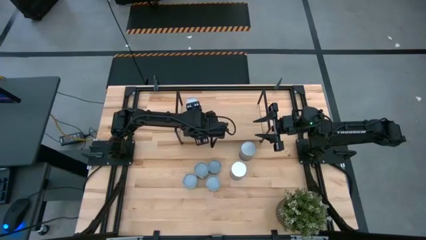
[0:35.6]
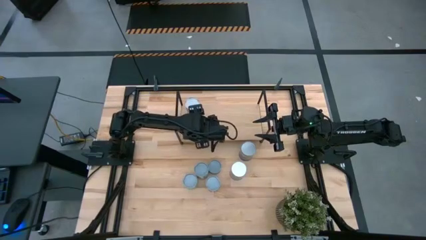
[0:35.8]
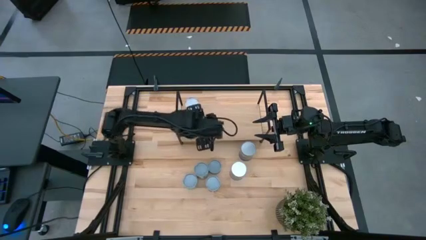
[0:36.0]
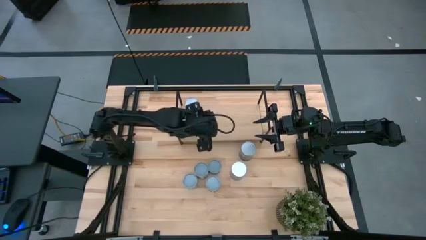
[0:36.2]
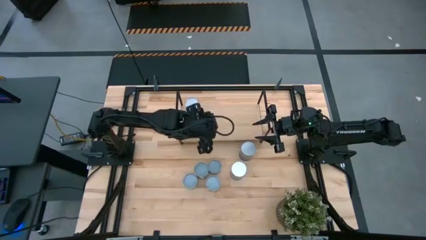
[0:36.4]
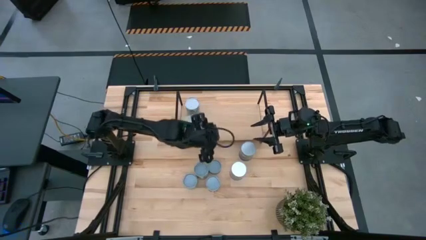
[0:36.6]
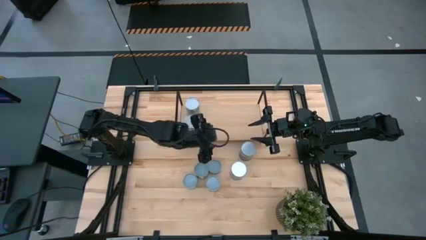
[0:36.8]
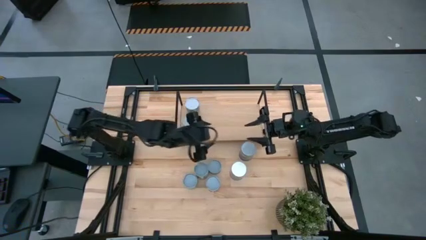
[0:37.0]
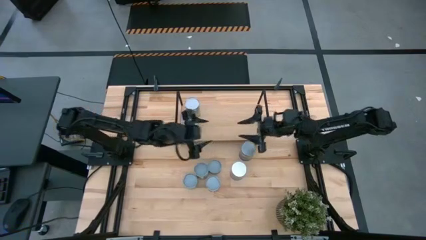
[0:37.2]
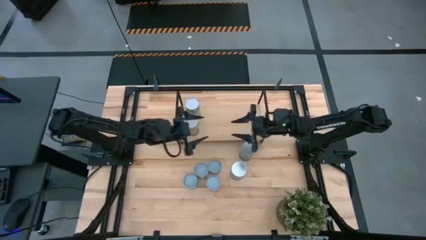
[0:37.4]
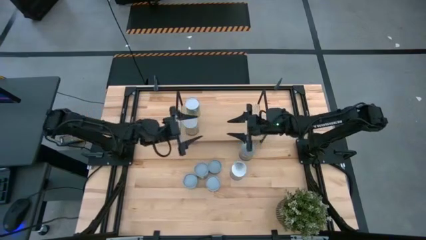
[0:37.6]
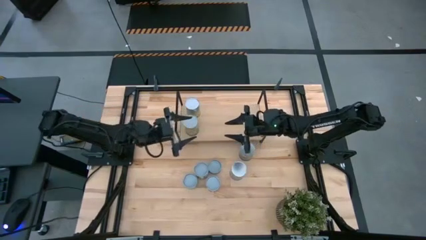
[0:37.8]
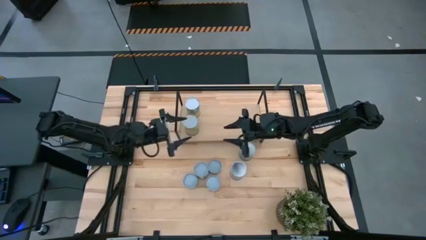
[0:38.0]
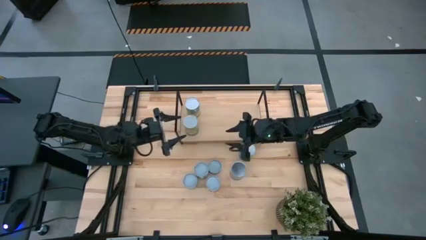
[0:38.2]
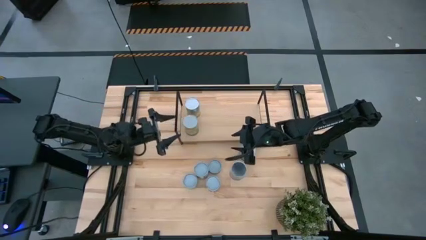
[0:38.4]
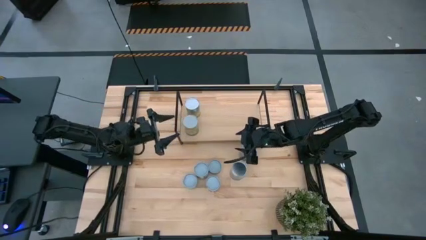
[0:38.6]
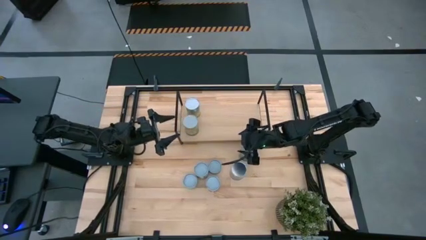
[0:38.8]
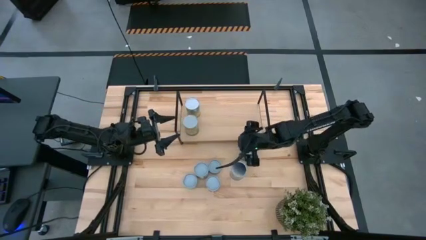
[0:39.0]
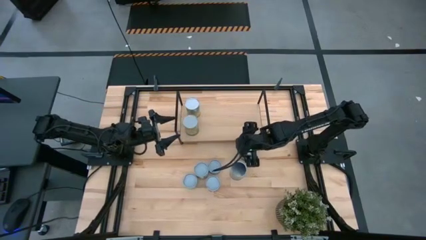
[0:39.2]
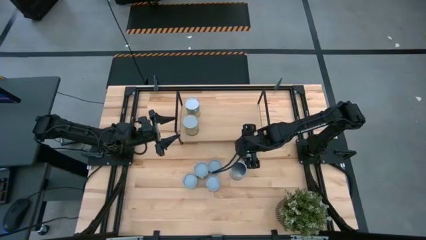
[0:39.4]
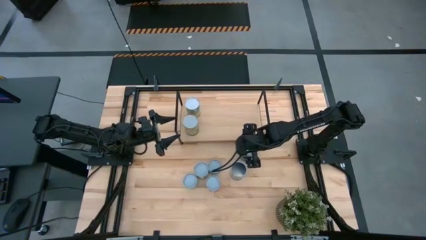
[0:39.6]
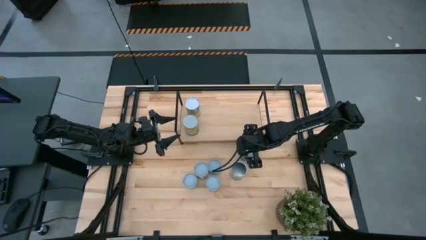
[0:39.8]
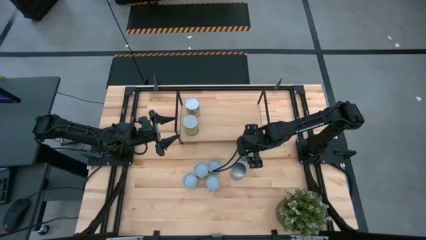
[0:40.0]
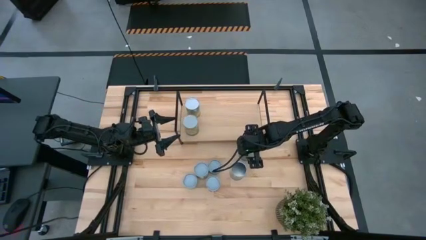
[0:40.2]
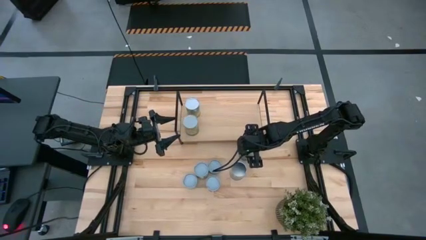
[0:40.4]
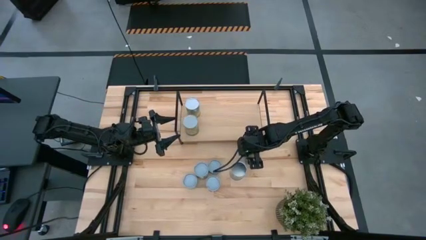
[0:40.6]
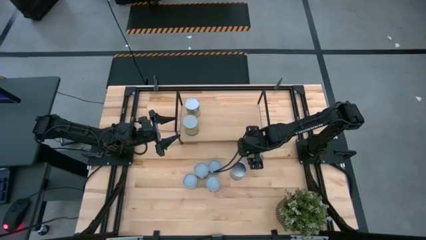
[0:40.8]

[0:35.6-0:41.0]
Task: Pick and place cans onto a shelf
Put the canned peas on the shelf

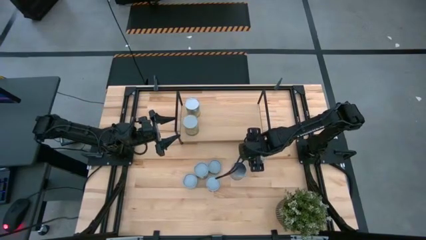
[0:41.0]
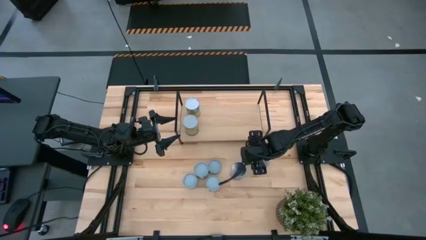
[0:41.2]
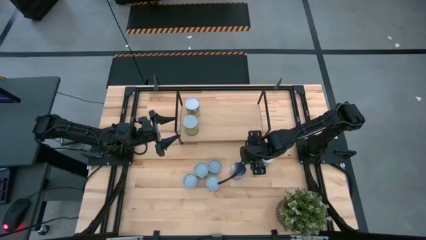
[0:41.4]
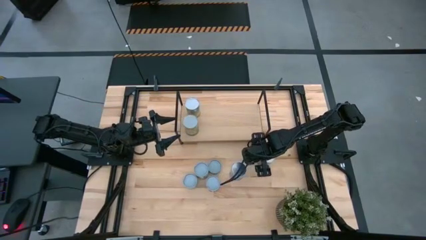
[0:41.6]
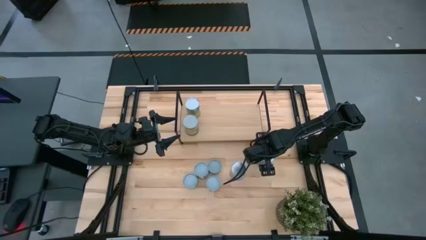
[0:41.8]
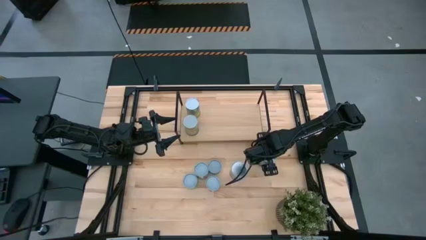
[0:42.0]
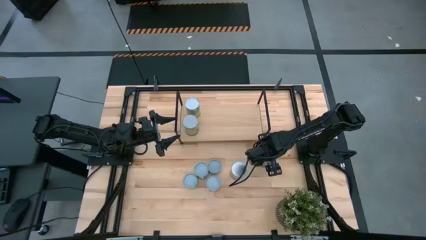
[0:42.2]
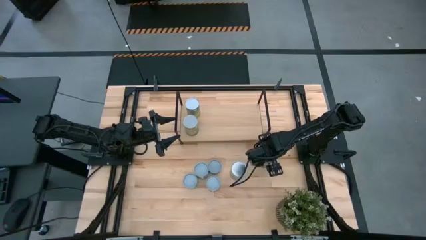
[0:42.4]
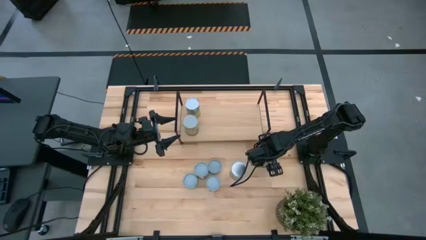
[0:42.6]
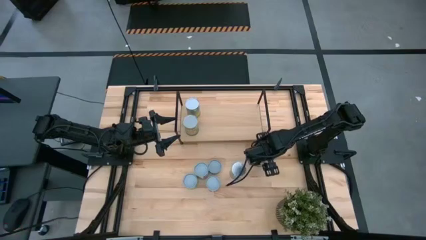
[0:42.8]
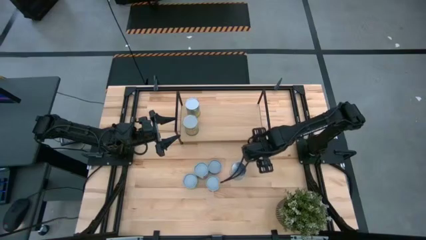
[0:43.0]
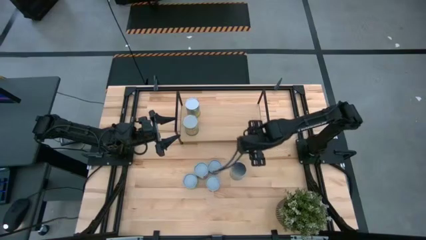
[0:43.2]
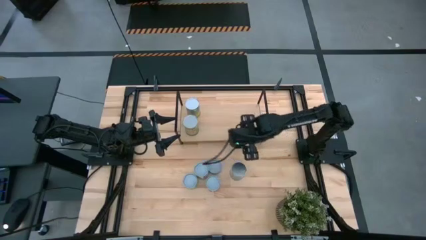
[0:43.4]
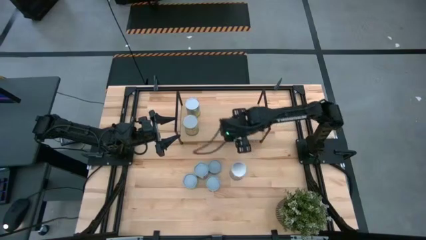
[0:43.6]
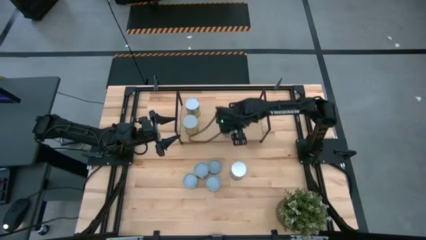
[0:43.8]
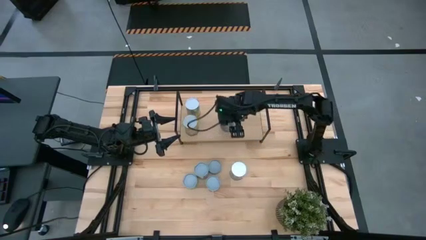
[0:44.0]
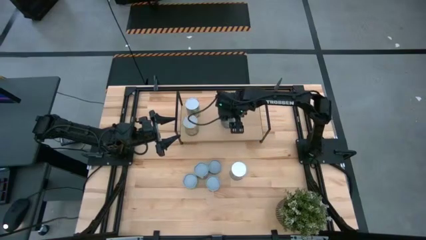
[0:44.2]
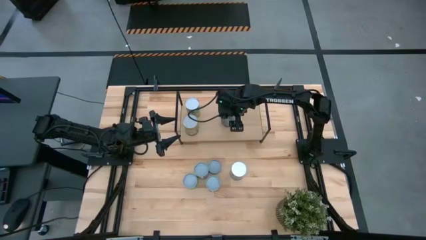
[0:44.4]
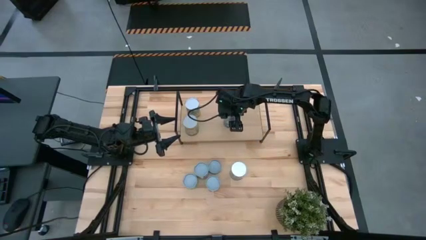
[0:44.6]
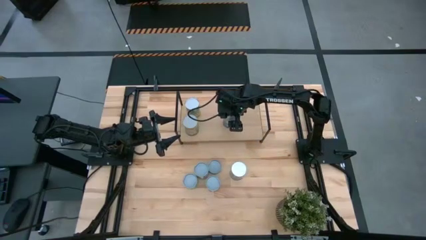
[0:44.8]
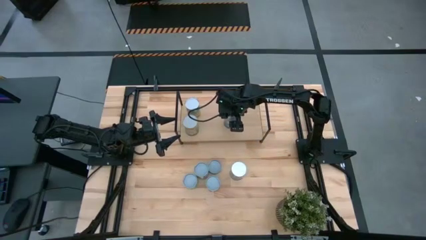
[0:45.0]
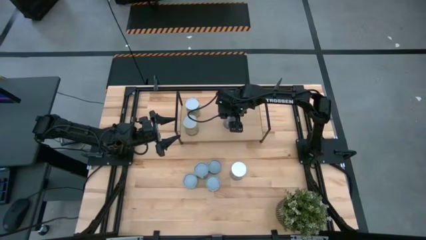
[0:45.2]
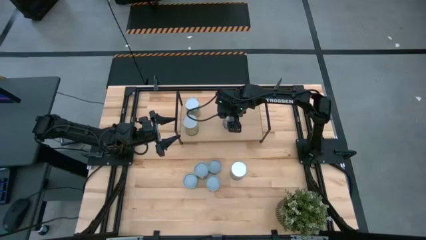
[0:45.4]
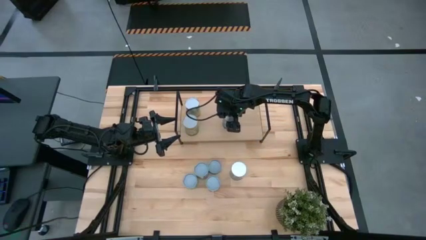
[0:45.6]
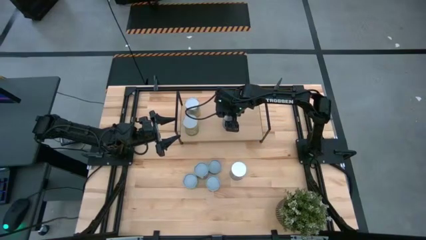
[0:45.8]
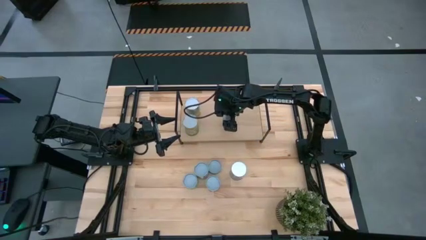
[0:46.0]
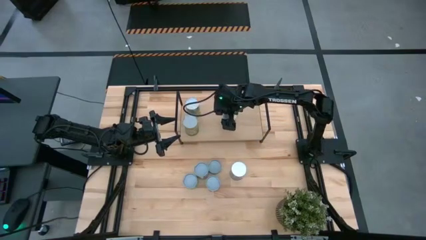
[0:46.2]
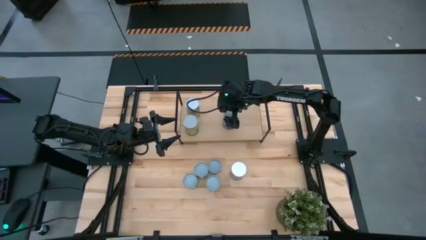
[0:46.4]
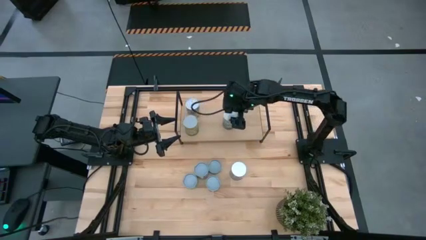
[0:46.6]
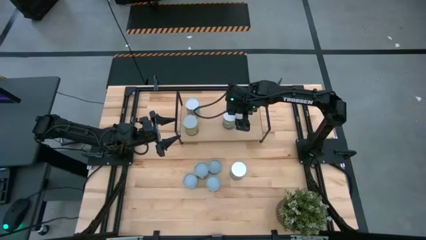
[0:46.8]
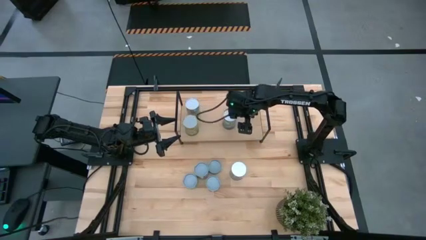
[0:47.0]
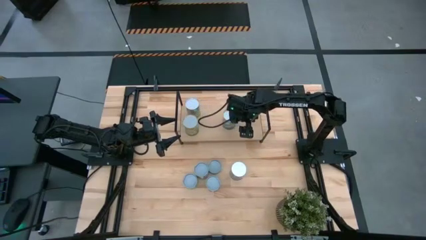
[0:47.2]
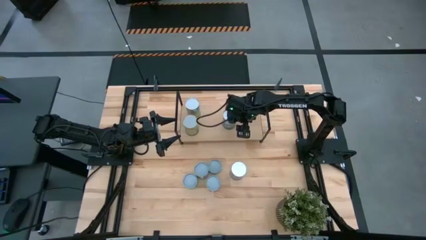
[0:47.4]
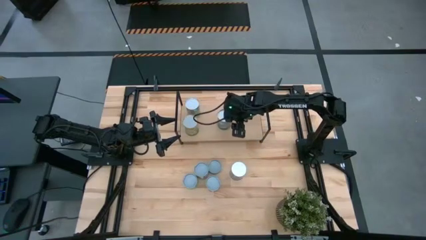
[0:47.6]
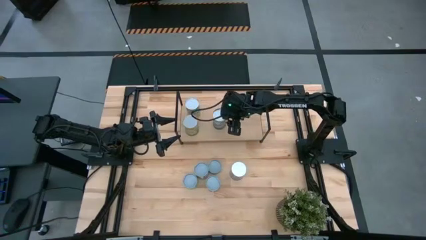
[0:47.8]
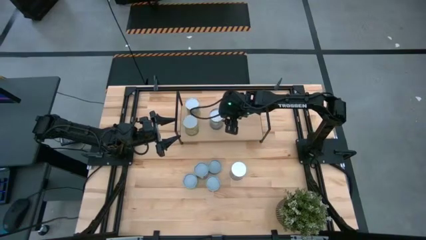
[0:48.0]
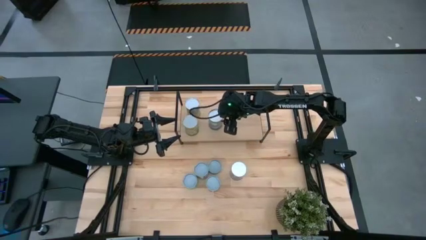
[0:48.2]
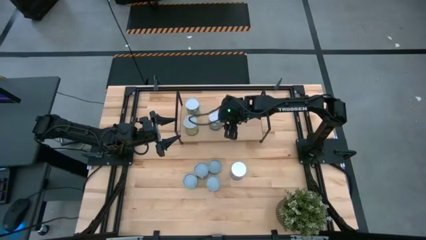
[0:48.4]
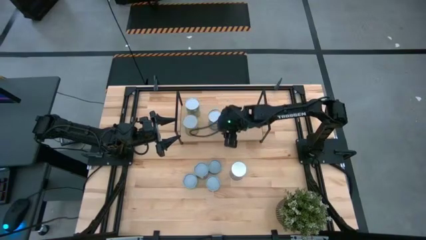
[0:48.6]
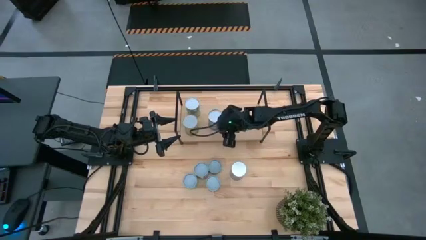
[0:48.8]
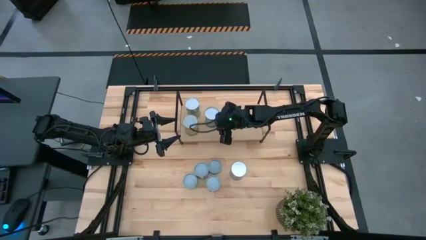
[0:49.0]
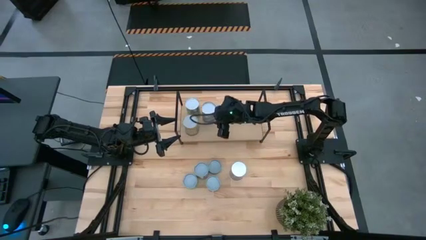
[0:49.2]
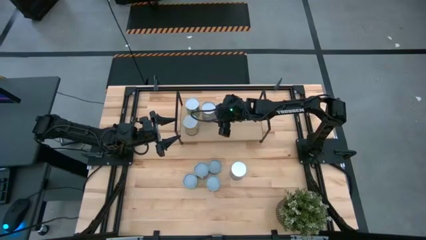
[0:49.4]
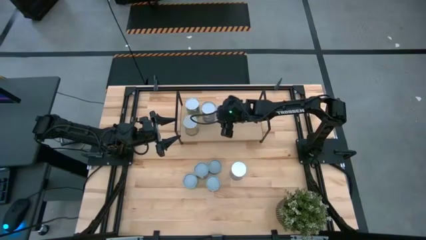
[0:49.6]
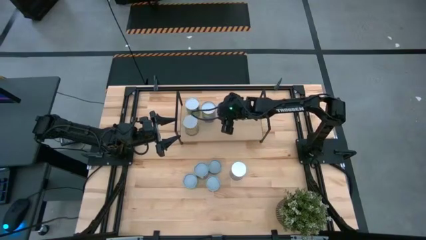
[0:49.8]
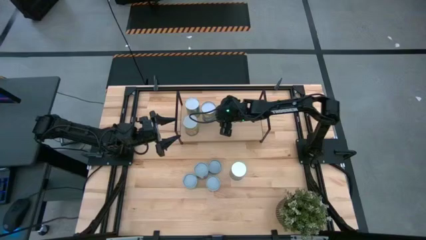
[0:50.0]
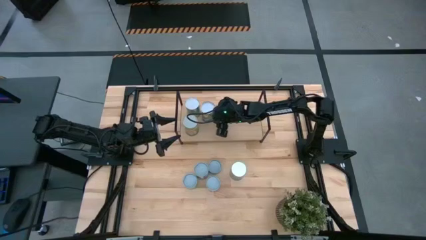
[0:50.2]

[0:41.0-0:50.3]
Put the canned peas on the shelf
